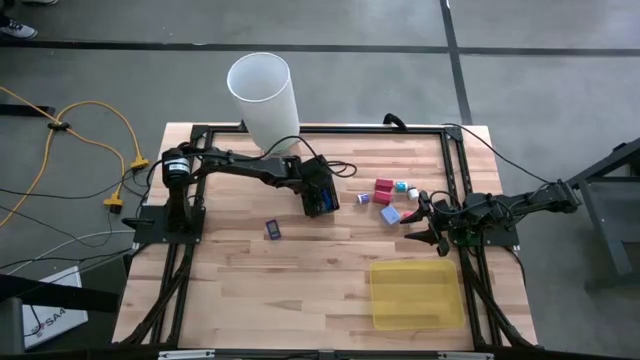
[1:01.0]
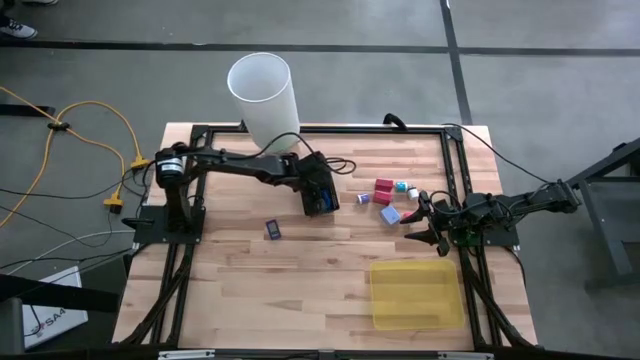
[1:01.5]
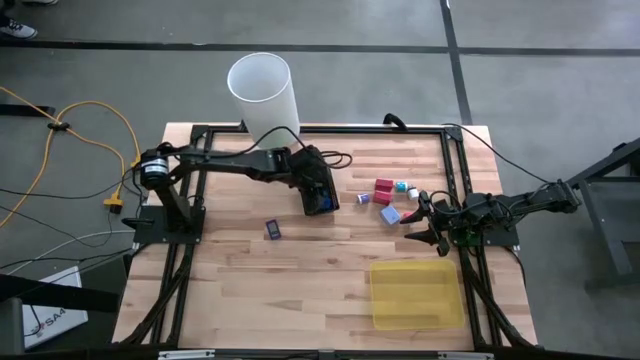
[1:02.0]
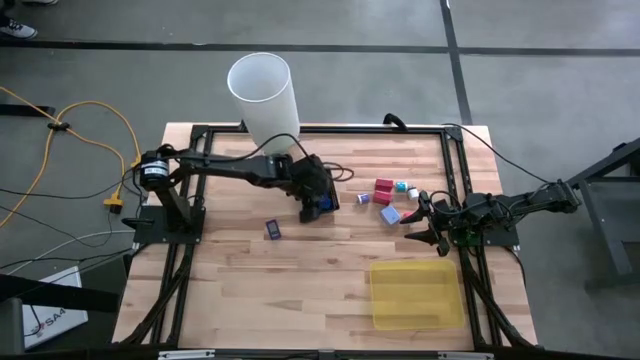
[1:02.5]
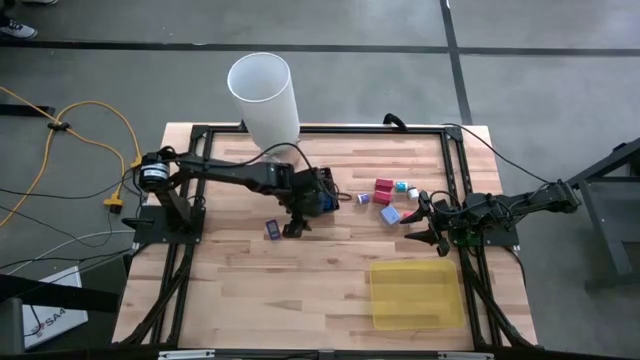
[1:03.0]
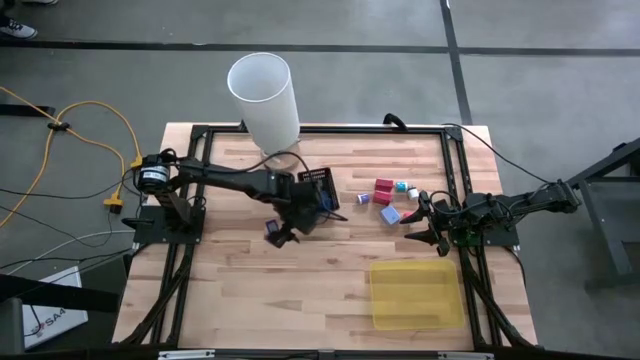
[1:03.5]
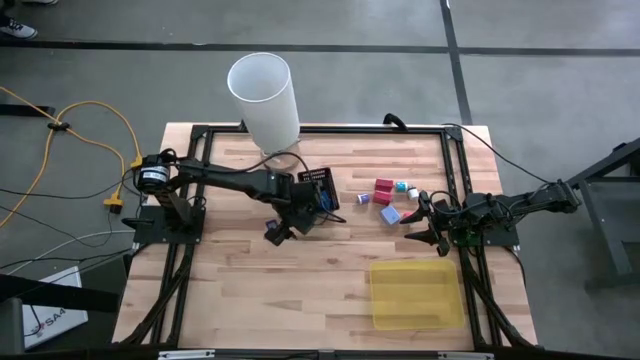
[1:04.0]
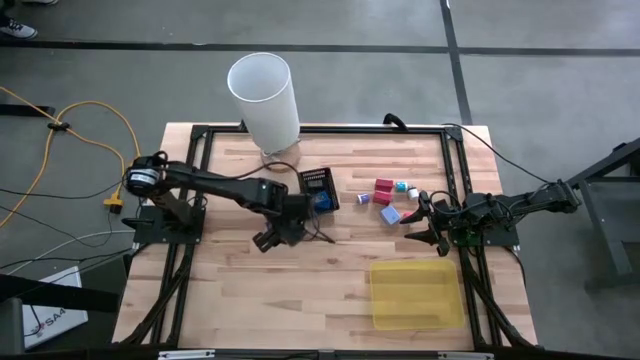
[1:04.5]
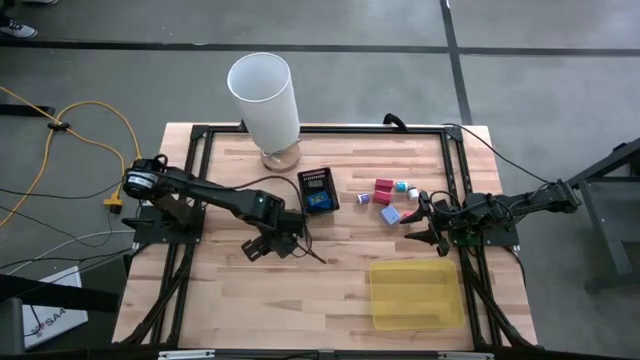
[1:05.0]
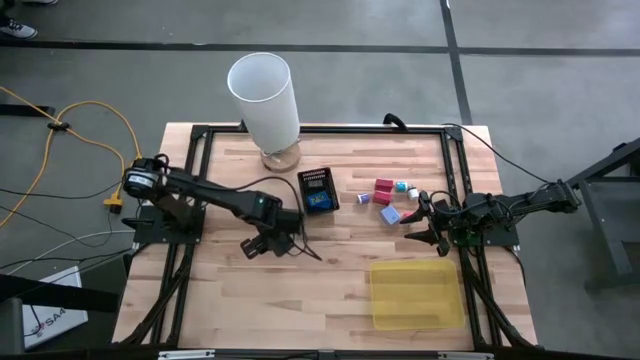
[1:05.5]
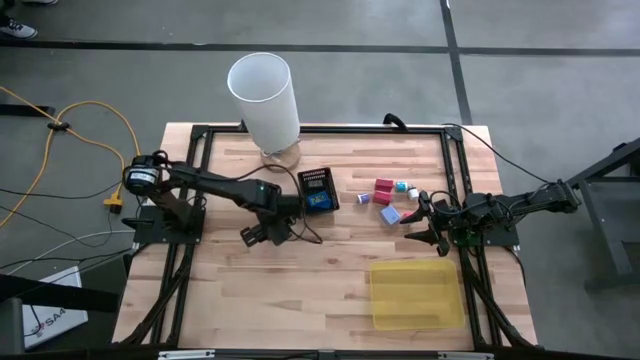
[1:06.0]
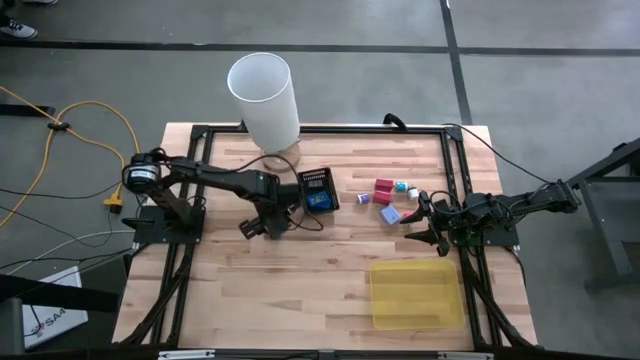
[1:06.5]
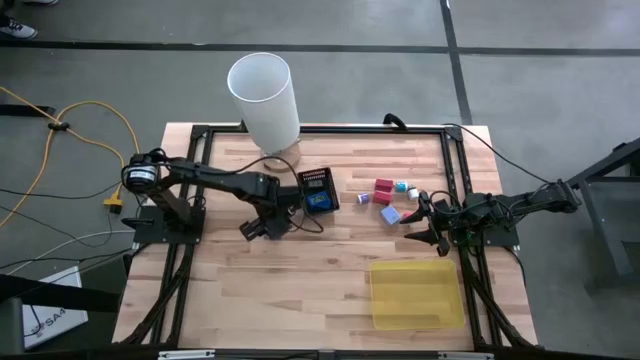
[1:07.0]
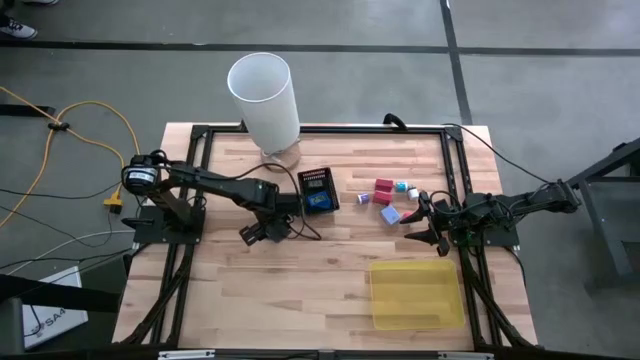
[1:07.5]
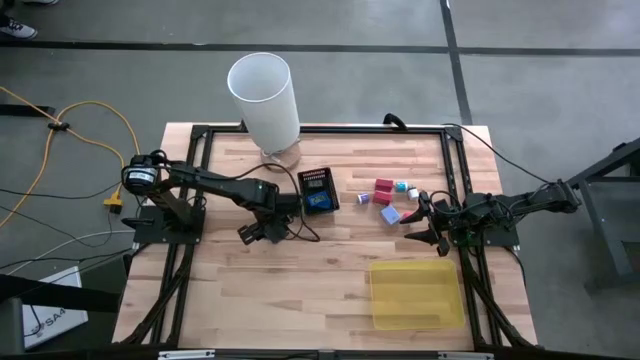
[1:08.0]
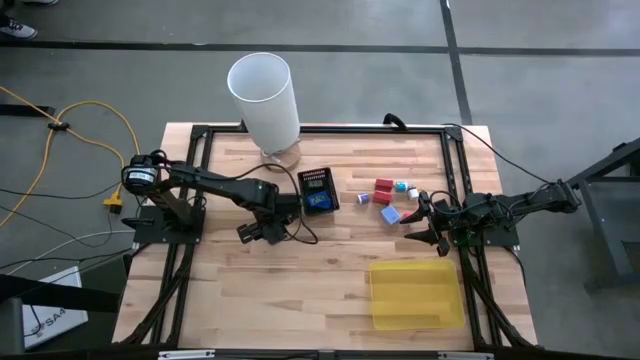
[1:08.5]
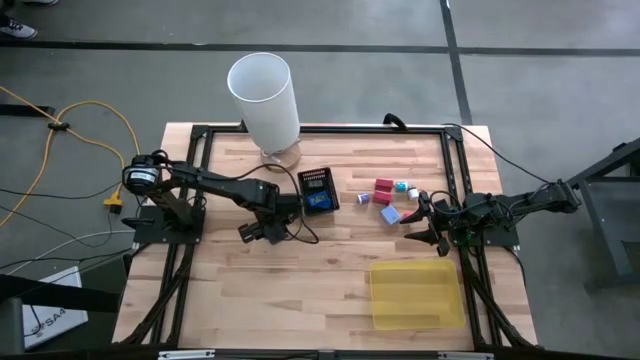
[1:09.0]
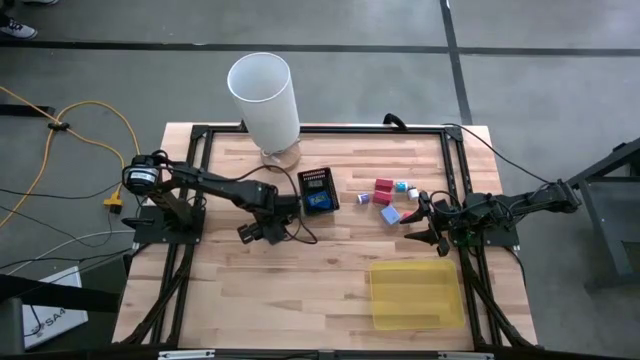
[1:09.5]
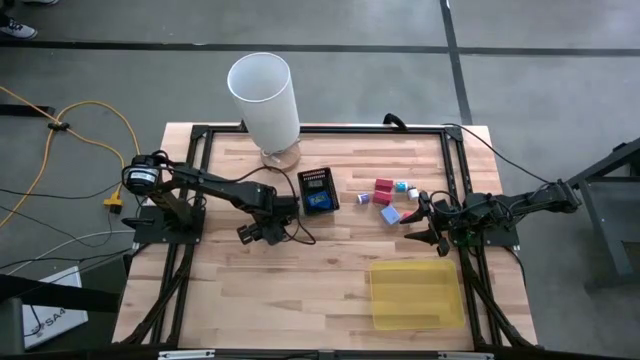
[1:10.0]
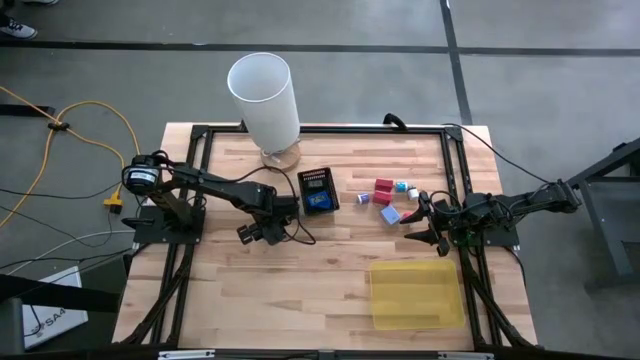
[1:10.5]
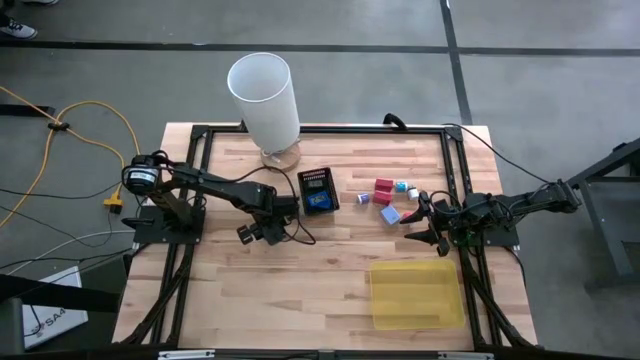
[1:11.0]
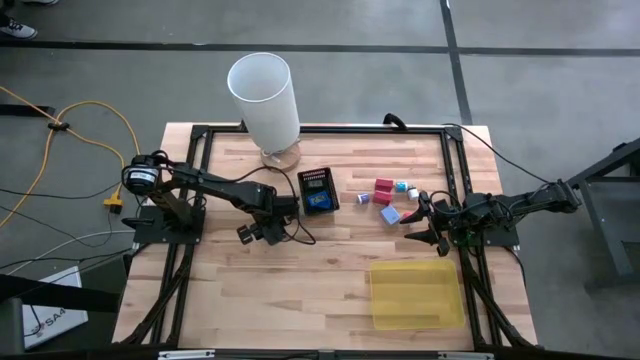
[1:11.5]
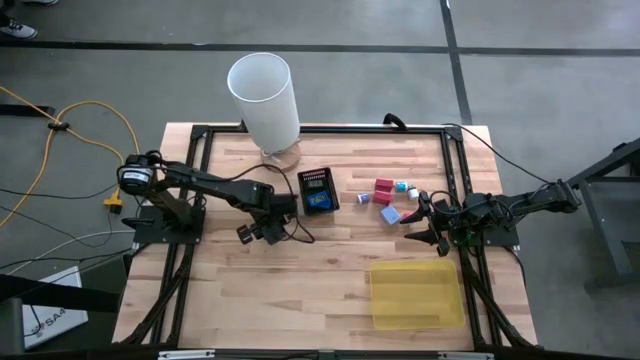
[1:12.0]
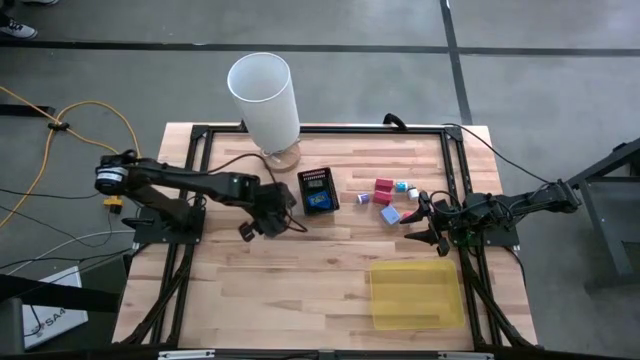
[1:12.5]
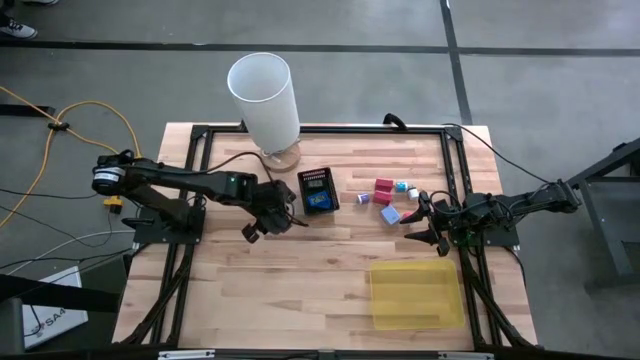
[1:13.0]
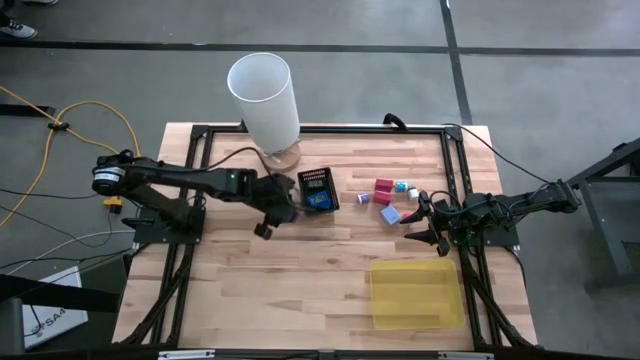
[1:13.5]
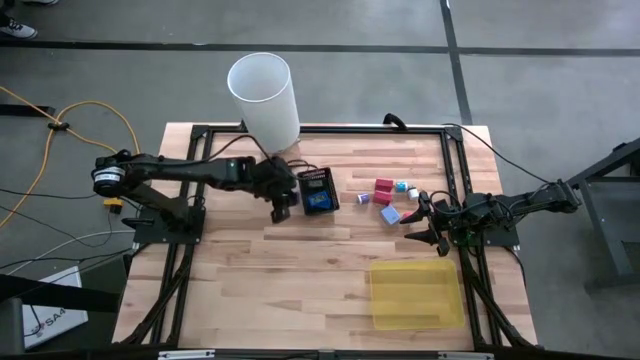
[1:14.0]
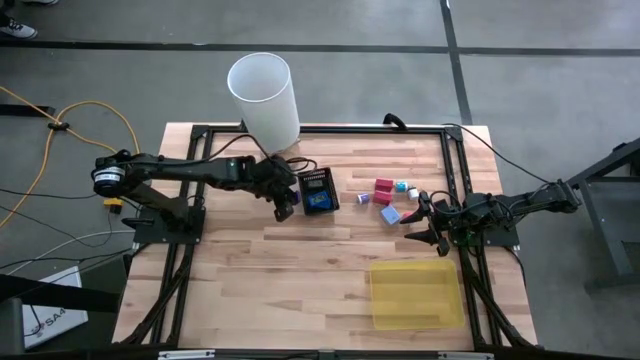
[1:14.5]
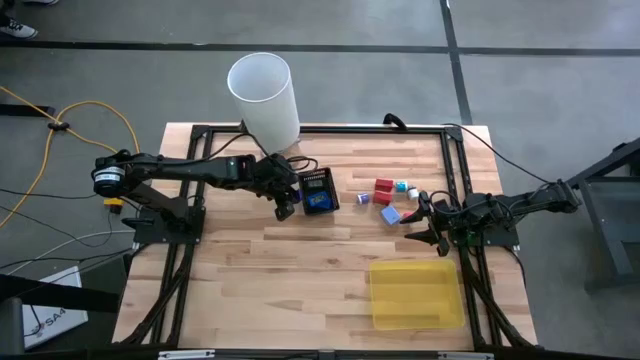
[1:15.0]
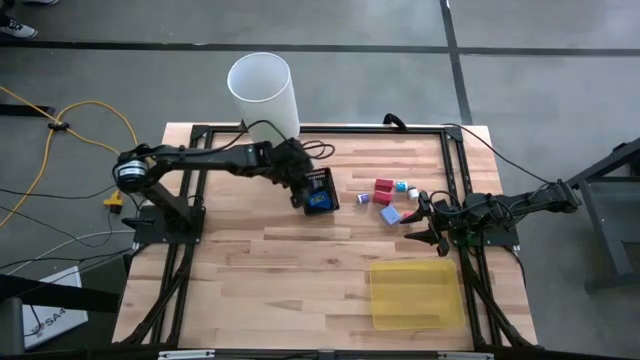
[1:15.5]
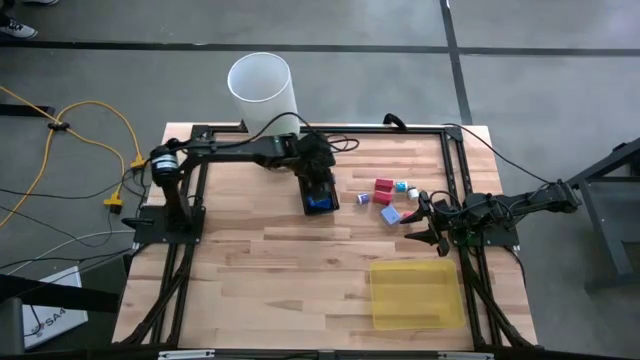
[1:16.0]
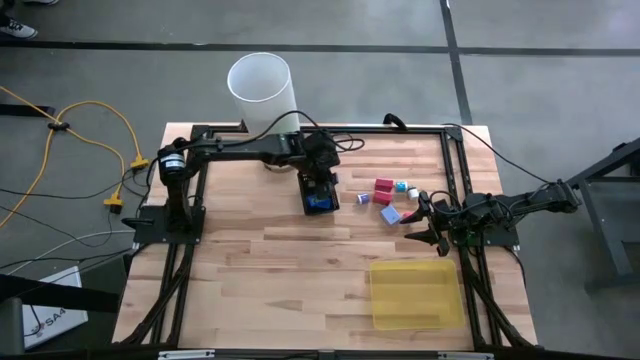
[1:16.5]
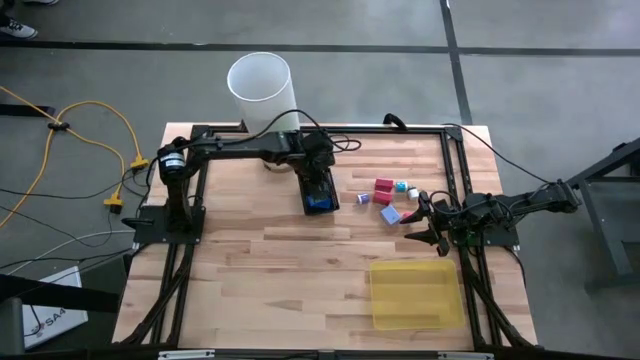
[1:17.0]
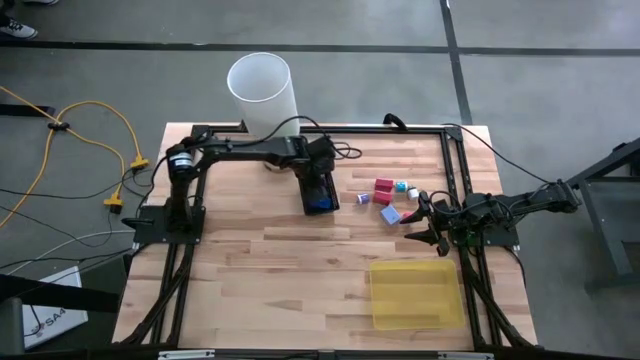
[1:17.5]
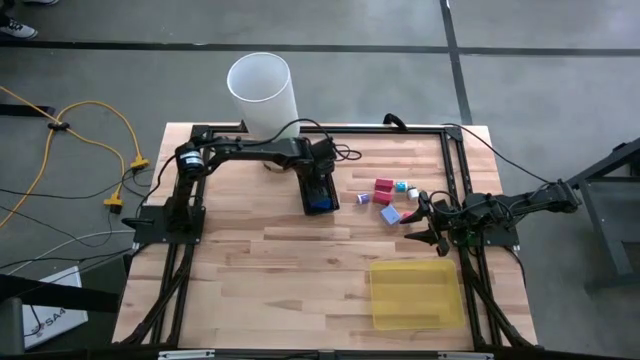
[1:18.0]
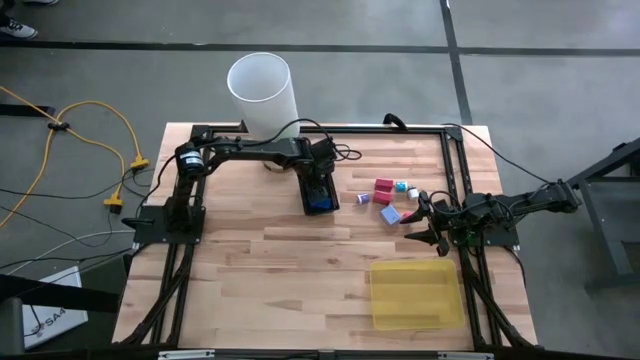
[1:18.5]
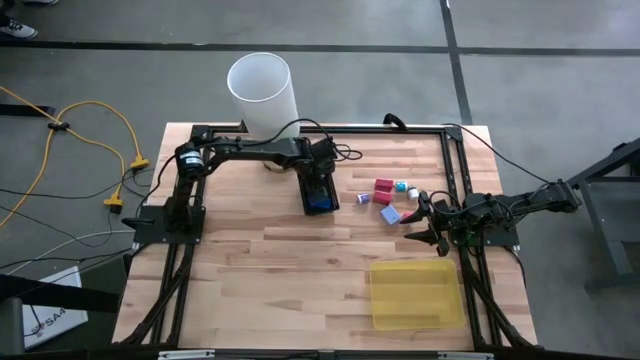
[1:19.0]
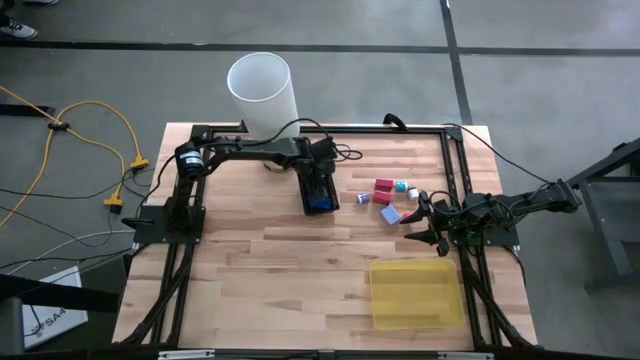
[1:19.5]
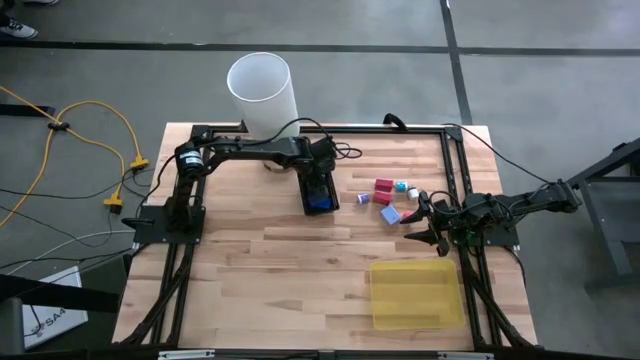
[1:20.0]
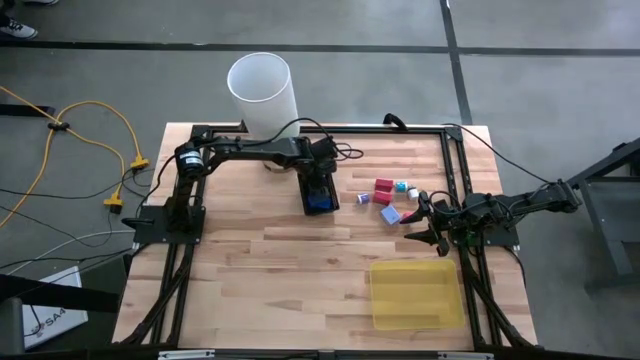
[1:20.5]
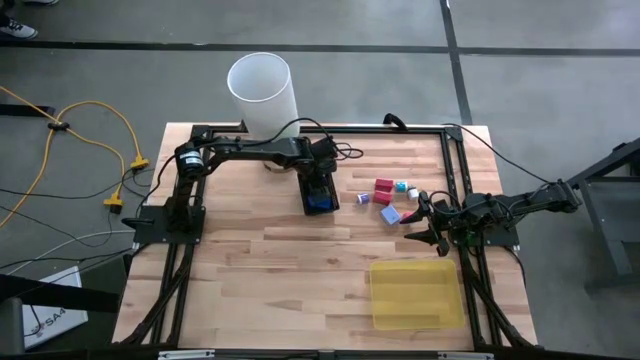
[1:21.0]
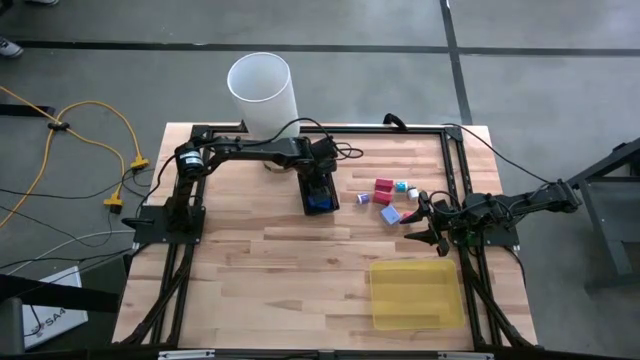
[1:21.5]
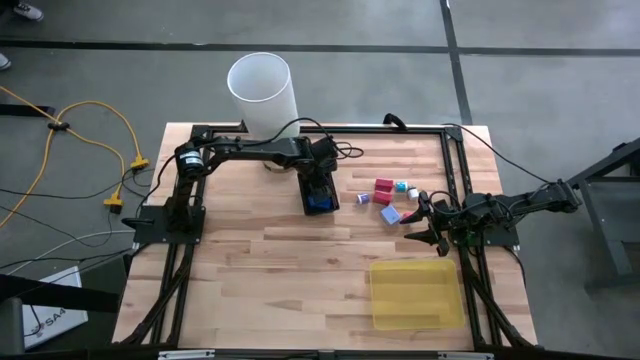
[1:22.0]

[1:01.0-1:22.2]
Task: Pick & Place Office items
Put the blue digital timer into the black bin
